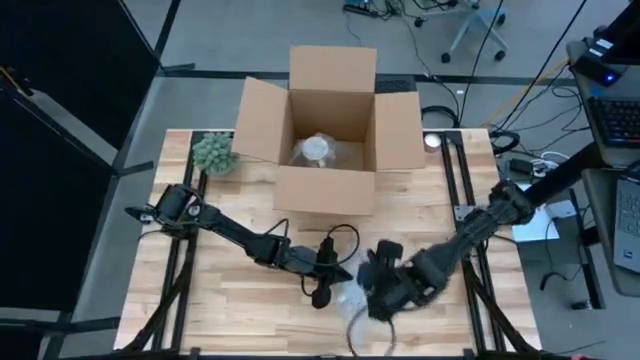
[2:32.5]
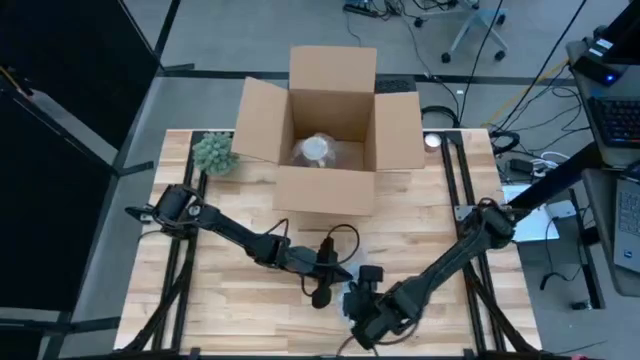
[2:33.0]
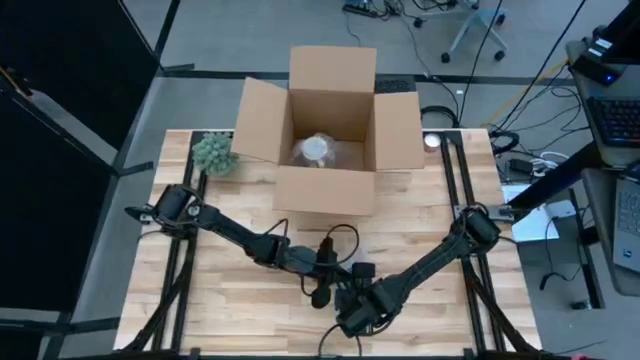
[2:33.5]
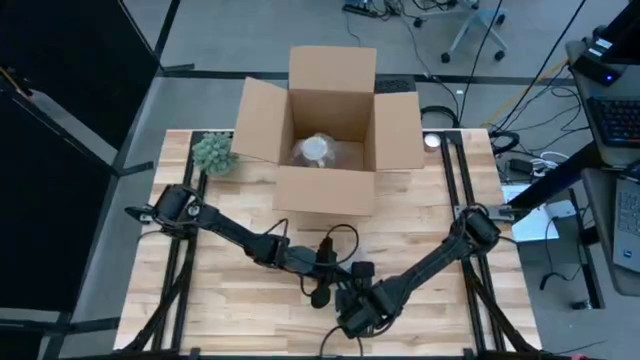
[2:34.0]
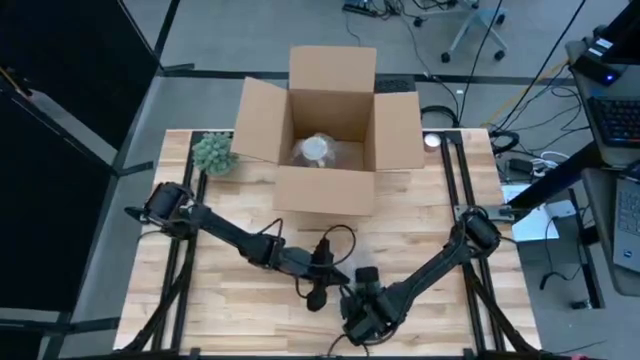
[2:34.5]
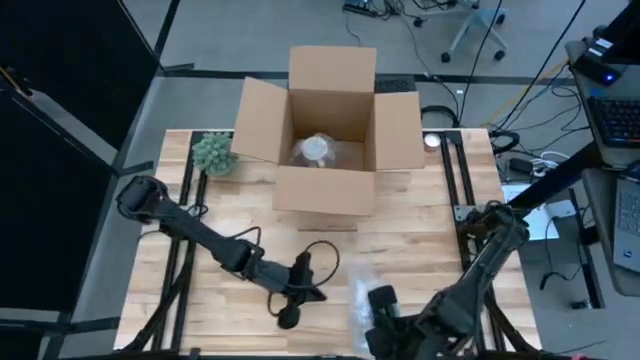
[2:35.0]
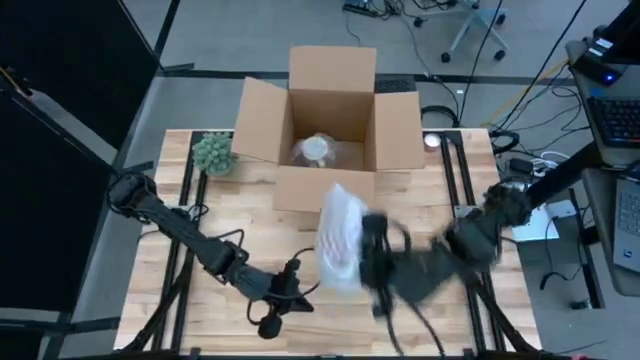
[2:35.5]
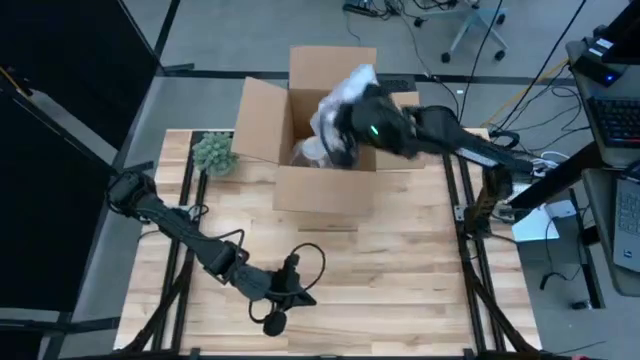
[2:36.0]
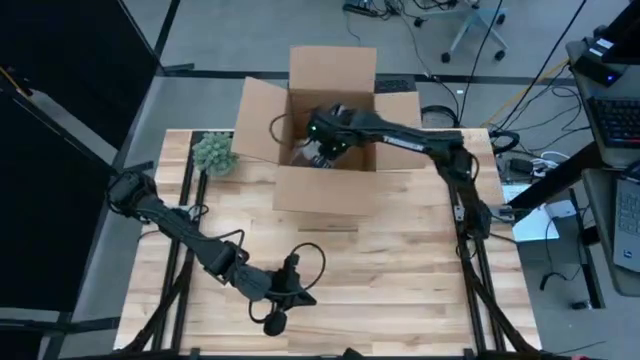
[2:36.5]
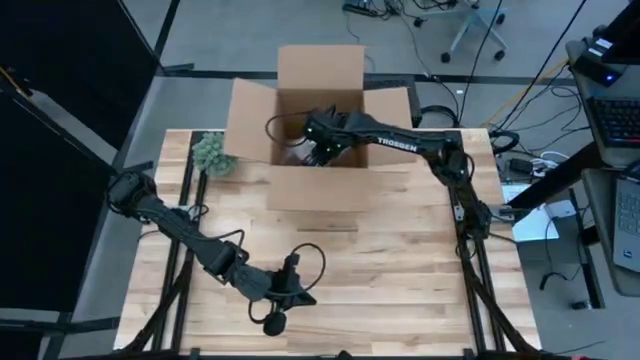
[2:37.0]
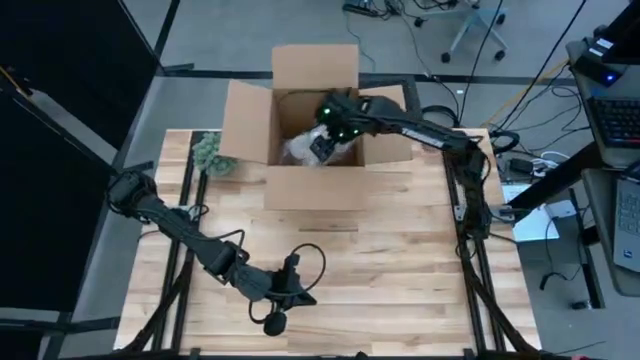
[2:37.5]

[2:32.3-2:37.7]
Task: wrap mug
Put the wrapped red mug into the box

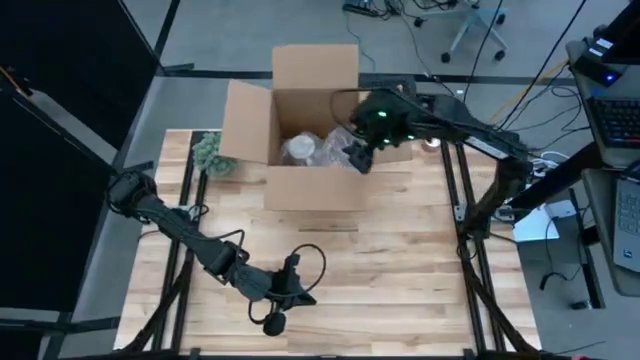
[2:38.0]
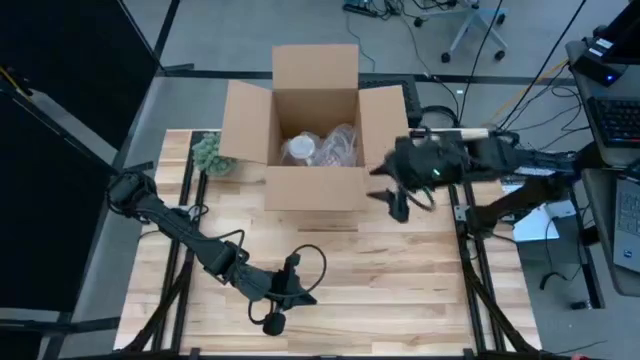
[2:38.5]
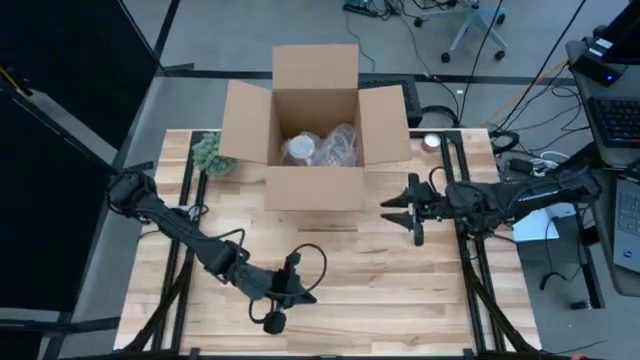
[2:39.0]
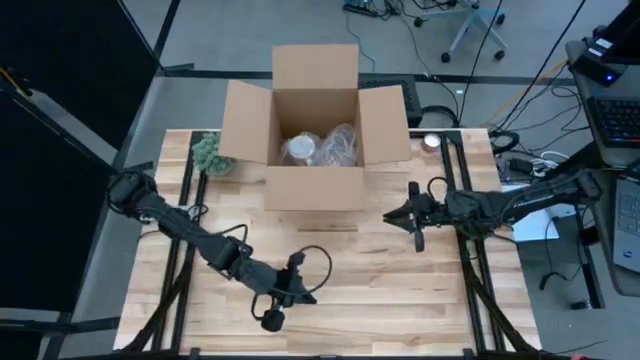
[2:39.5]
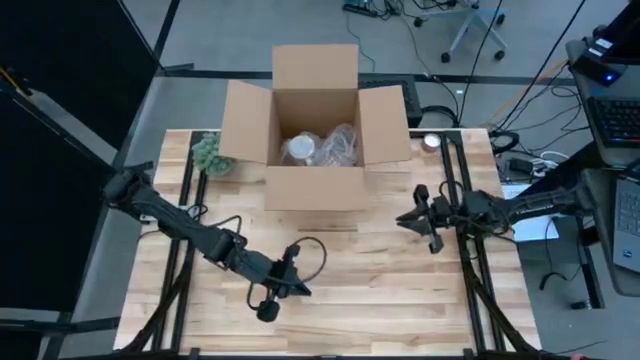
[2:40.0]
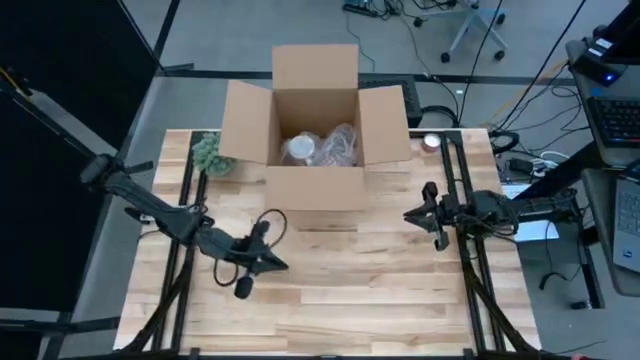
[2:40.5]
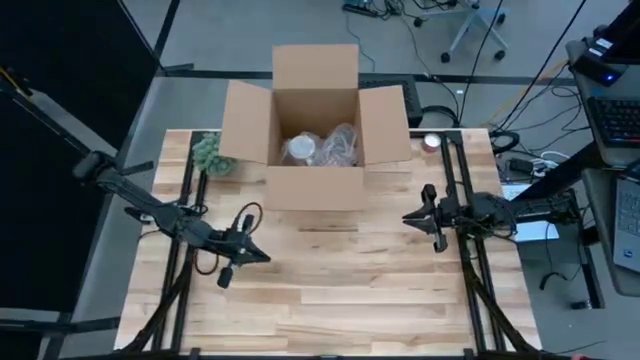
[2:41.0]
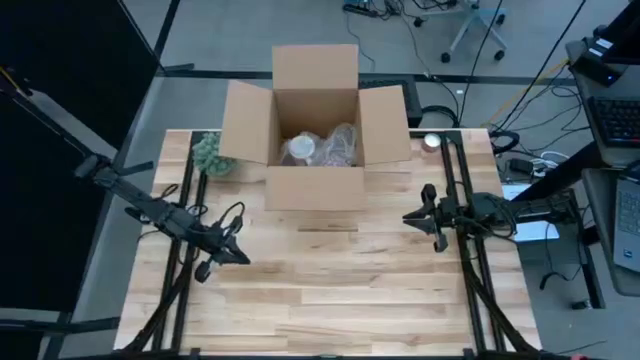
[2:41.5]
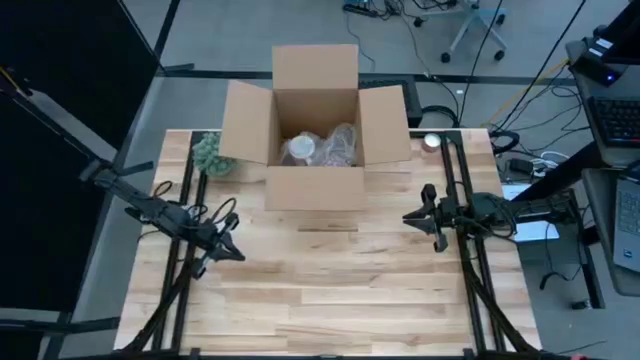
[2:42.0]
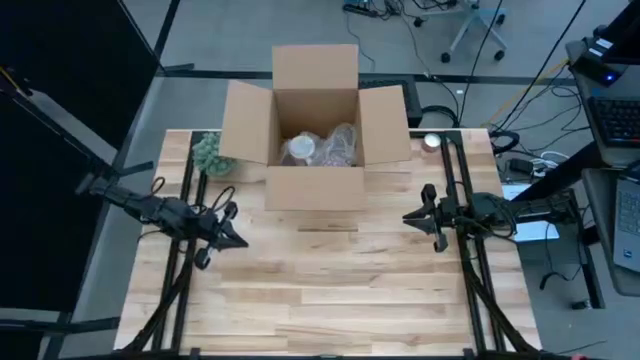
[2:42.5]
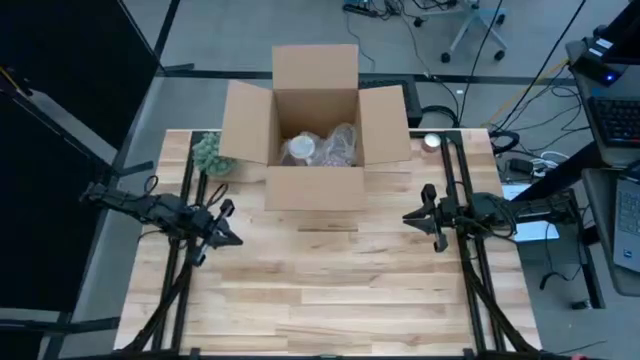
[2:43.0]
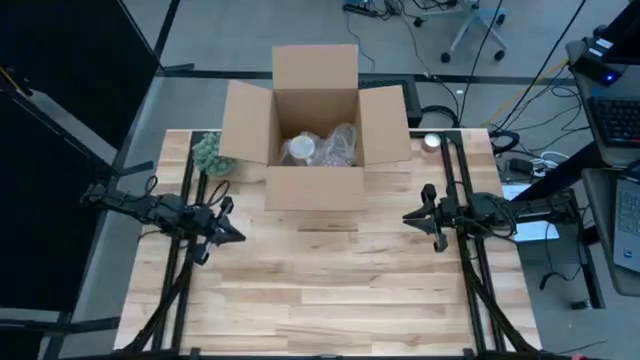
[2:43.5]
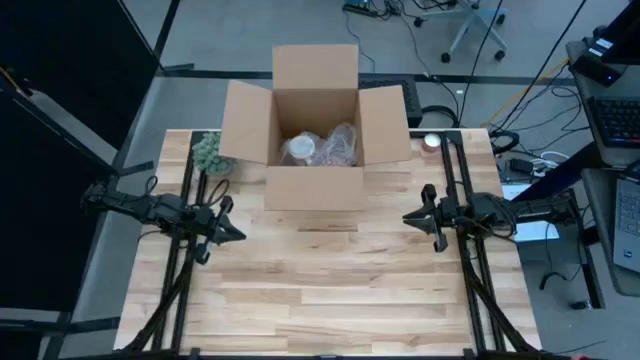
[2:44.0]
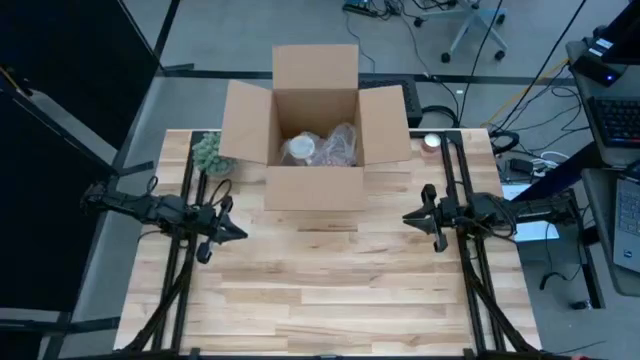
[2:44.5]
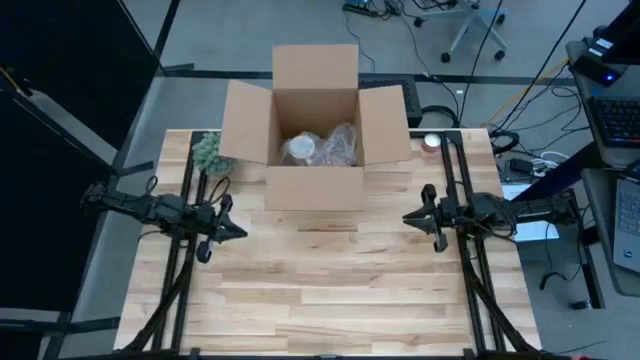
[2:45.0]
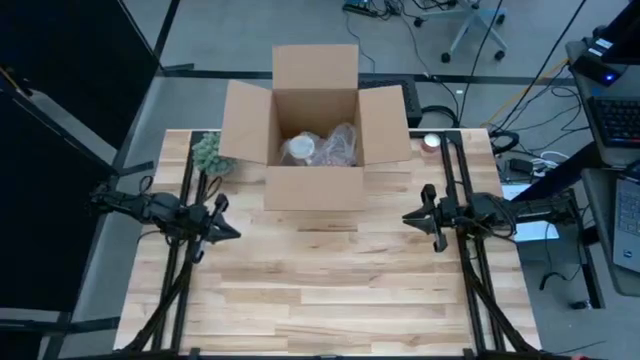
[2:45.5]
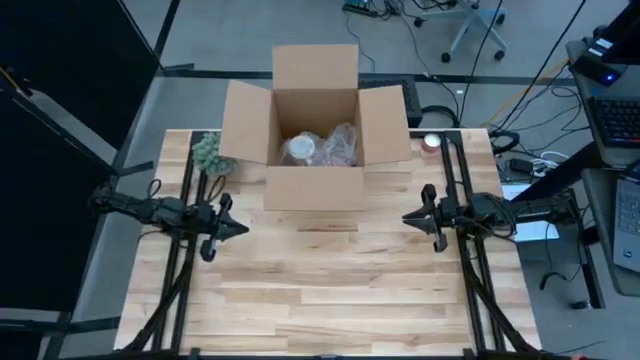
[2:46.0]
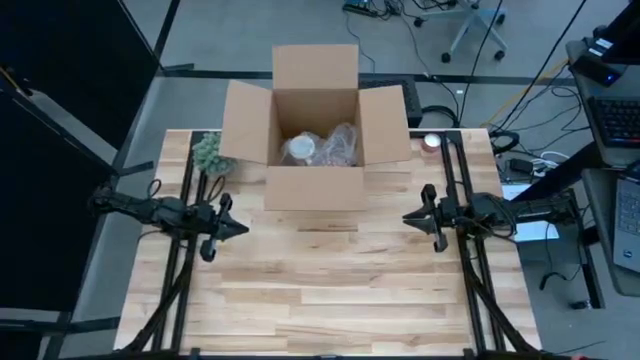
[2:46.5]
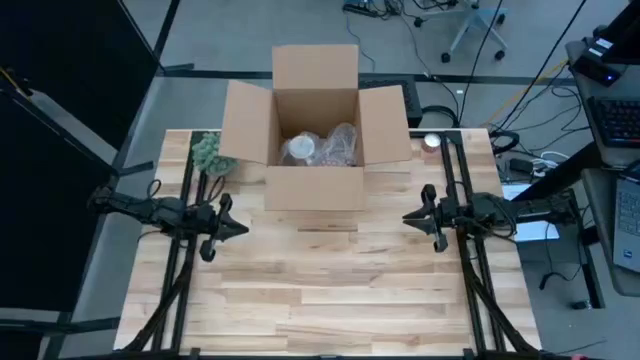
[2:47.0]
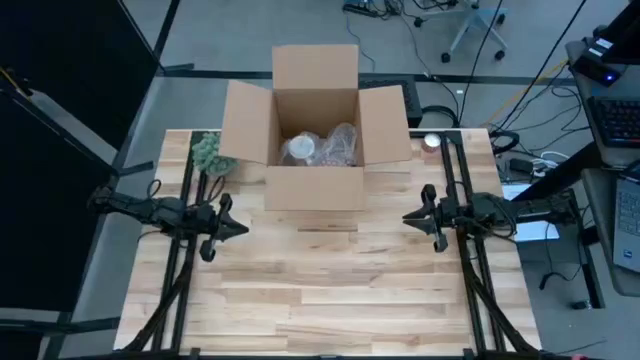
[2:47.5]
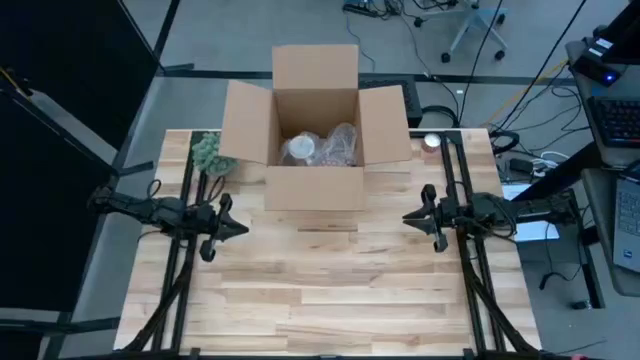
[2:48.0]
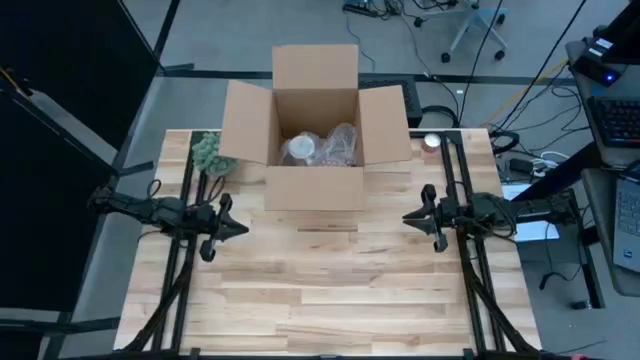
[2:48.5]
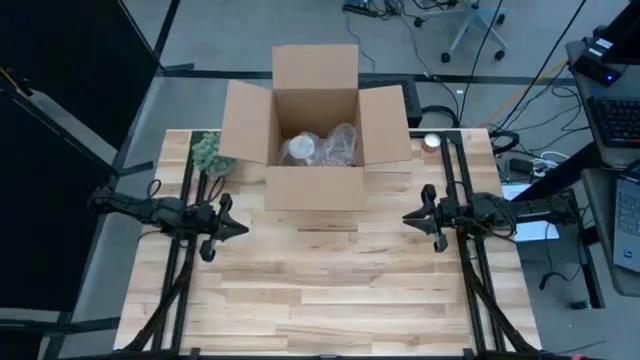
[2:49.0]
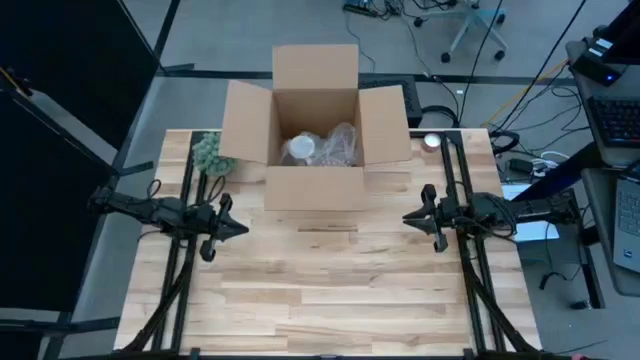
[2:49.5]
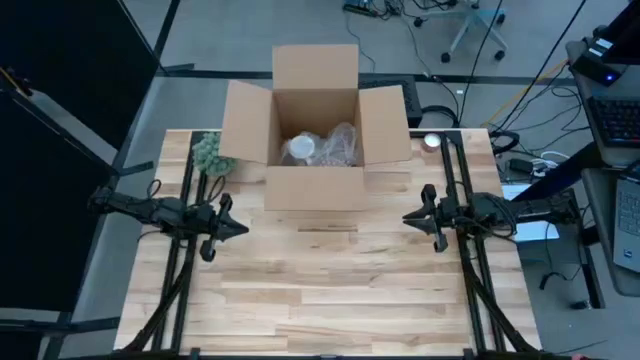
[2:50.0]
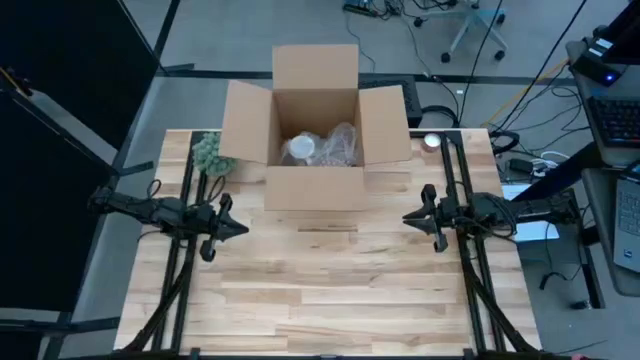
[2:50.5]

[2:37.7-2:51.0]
Return to Home Position
